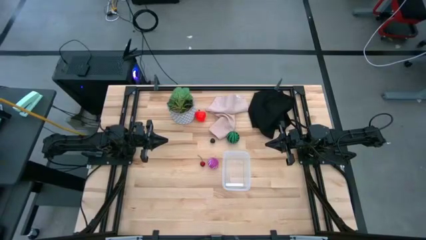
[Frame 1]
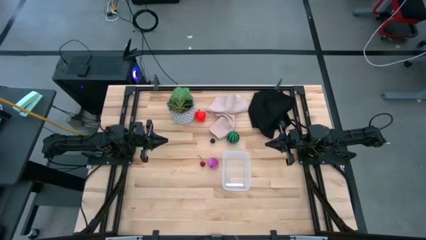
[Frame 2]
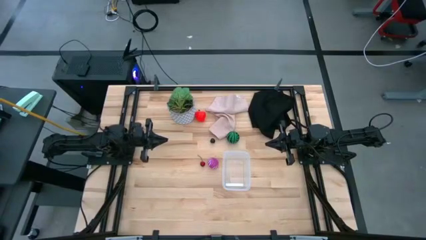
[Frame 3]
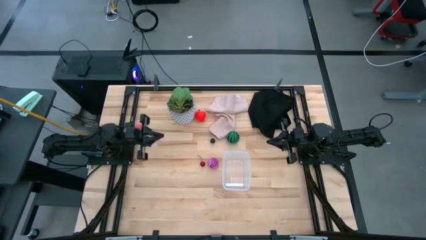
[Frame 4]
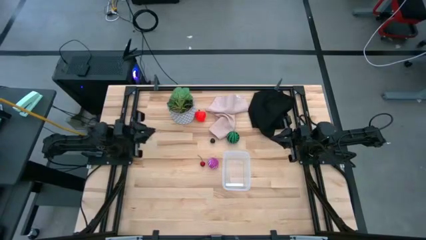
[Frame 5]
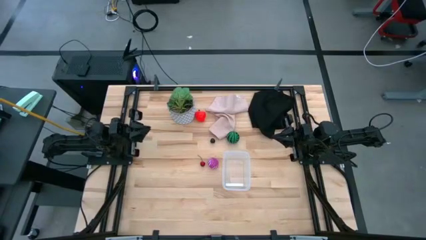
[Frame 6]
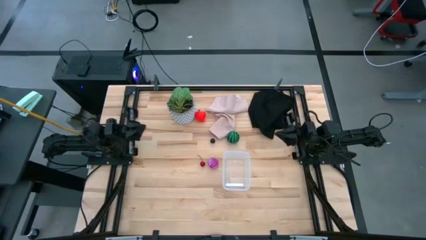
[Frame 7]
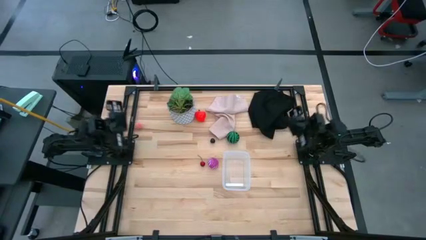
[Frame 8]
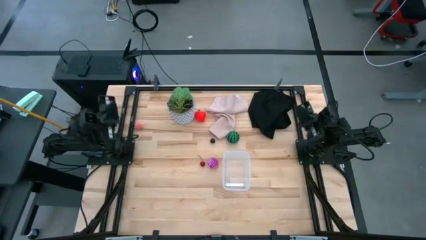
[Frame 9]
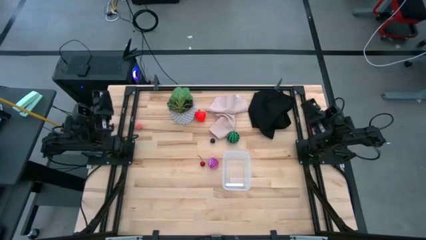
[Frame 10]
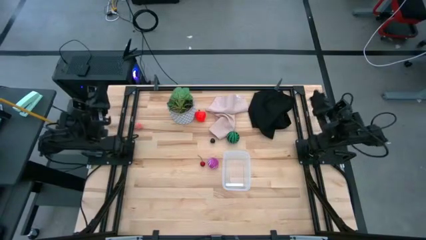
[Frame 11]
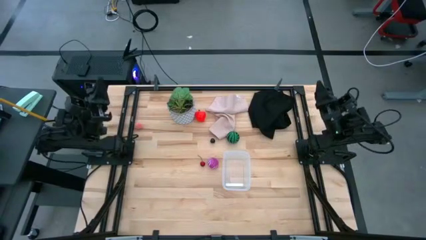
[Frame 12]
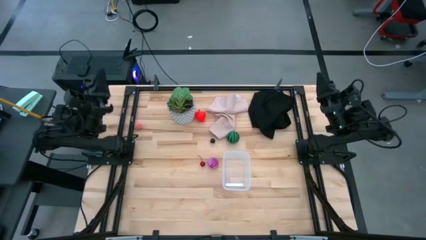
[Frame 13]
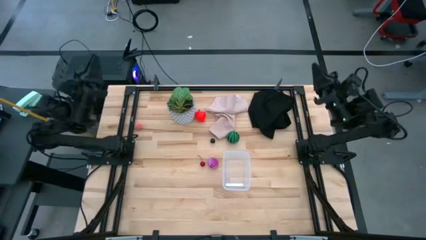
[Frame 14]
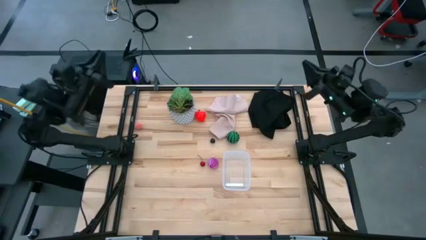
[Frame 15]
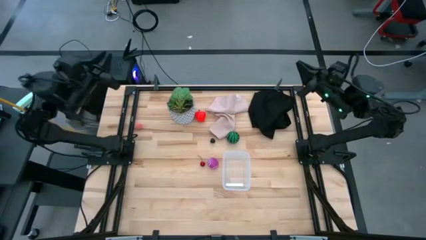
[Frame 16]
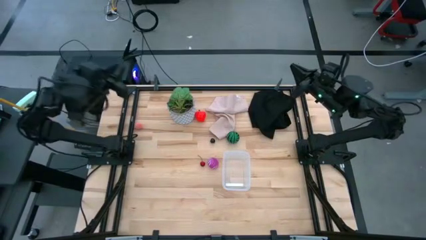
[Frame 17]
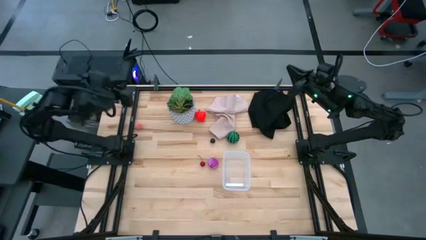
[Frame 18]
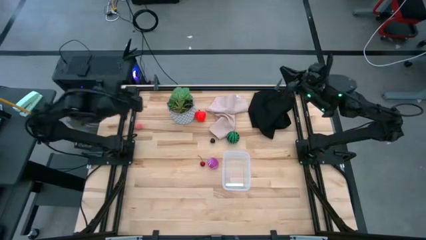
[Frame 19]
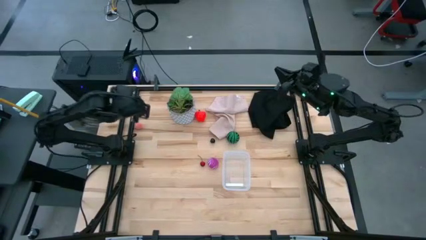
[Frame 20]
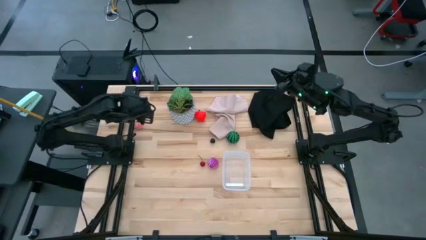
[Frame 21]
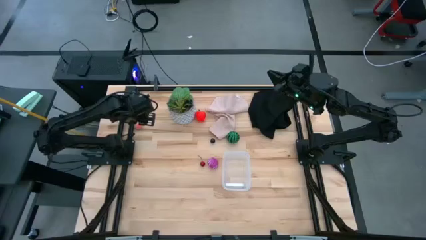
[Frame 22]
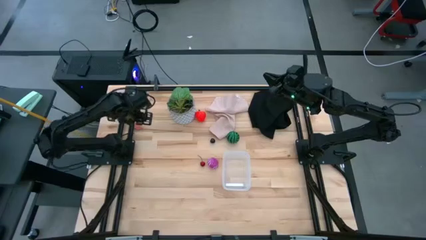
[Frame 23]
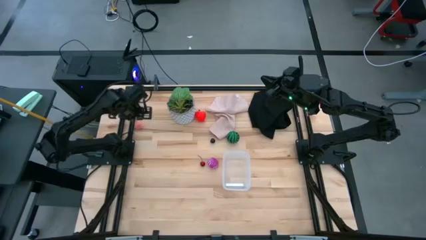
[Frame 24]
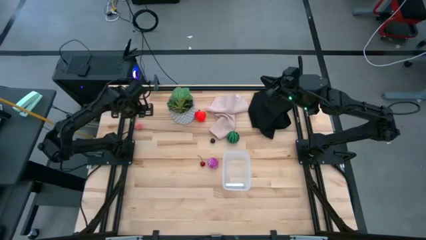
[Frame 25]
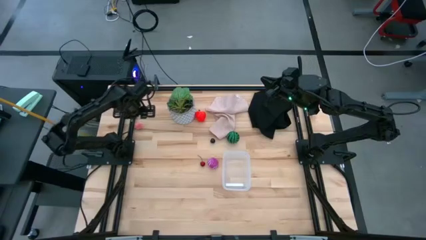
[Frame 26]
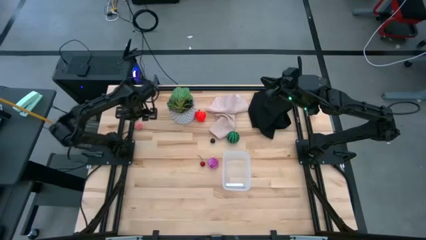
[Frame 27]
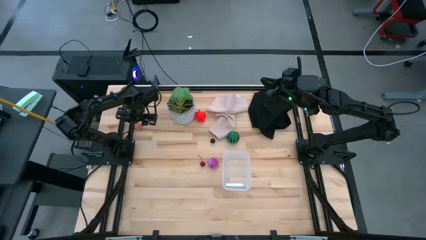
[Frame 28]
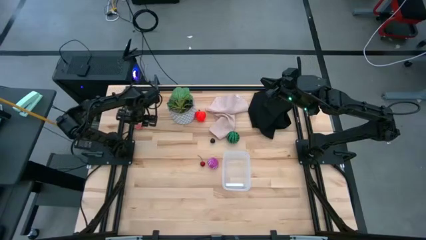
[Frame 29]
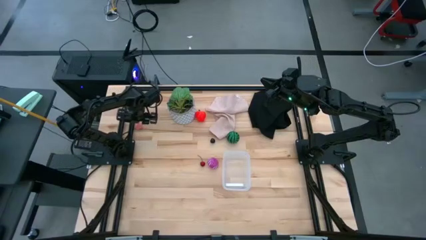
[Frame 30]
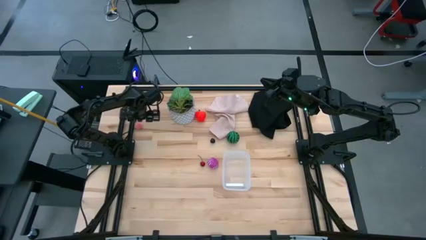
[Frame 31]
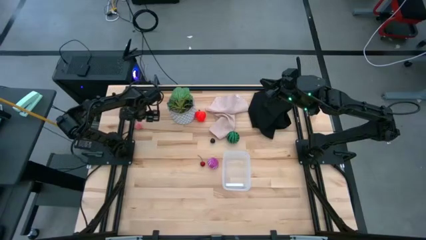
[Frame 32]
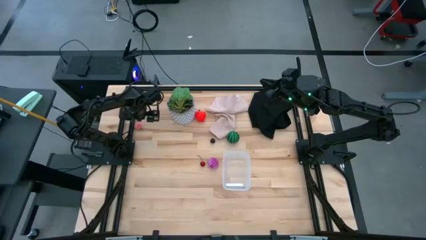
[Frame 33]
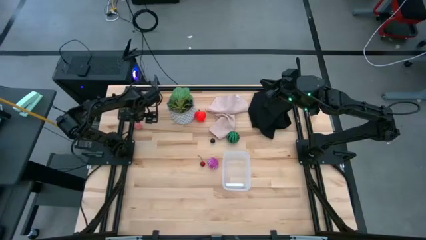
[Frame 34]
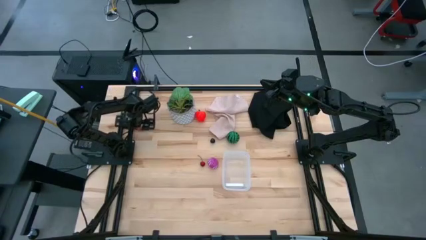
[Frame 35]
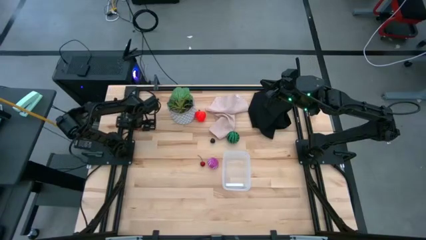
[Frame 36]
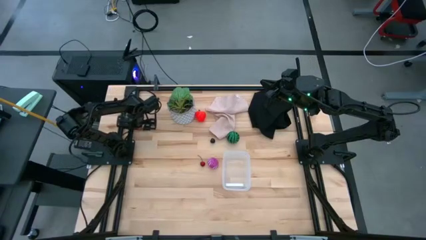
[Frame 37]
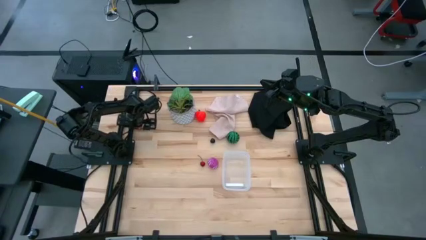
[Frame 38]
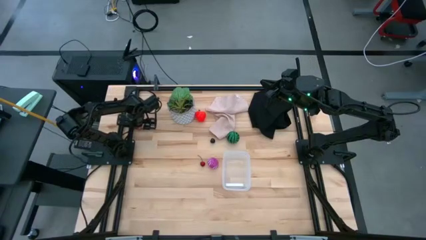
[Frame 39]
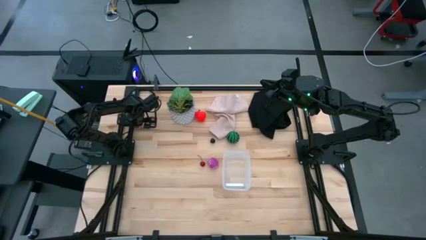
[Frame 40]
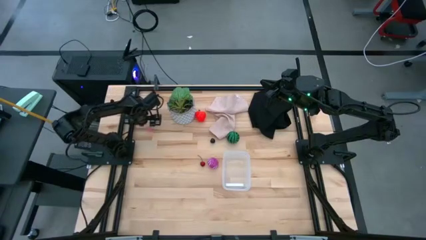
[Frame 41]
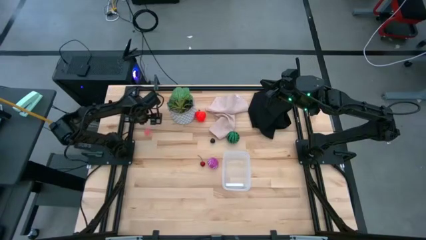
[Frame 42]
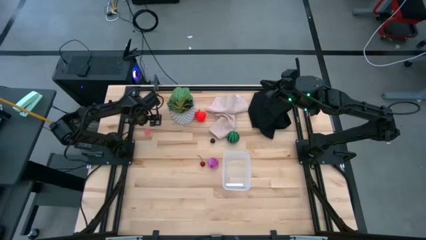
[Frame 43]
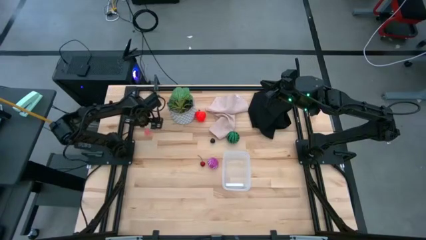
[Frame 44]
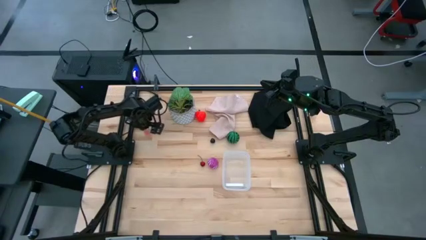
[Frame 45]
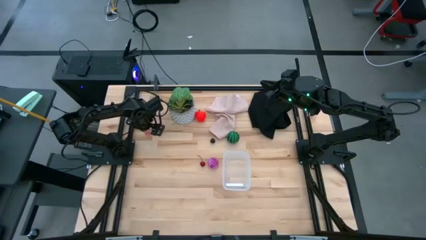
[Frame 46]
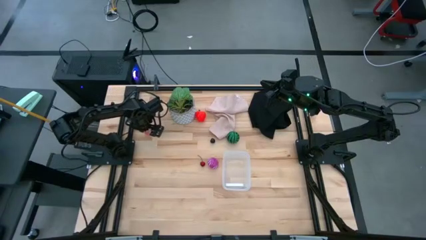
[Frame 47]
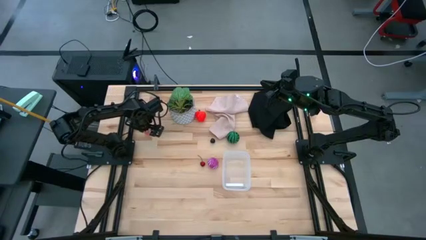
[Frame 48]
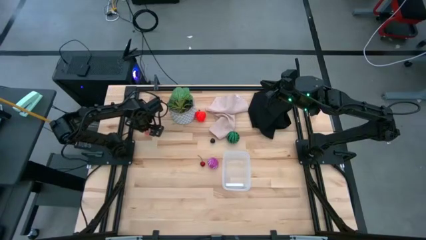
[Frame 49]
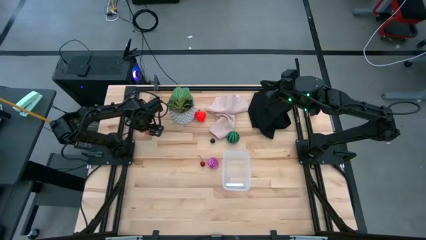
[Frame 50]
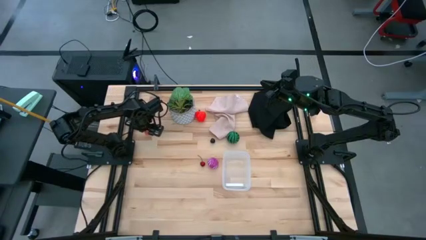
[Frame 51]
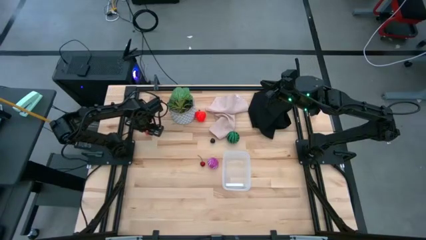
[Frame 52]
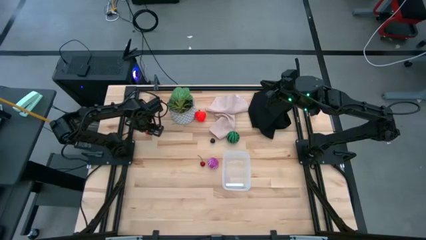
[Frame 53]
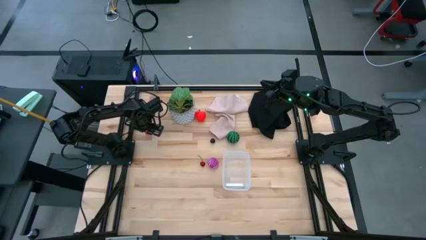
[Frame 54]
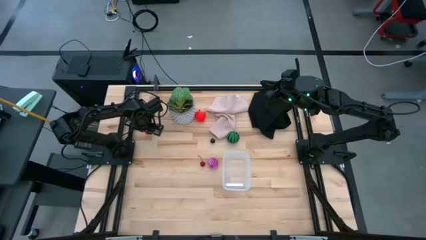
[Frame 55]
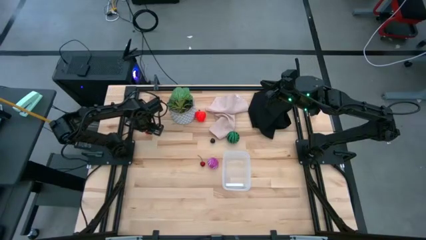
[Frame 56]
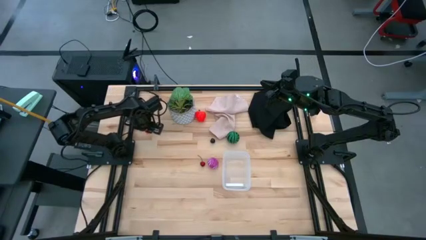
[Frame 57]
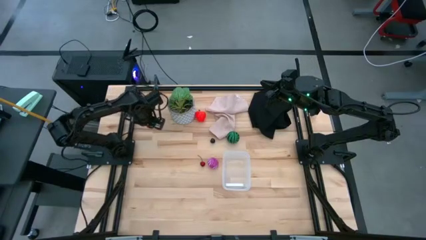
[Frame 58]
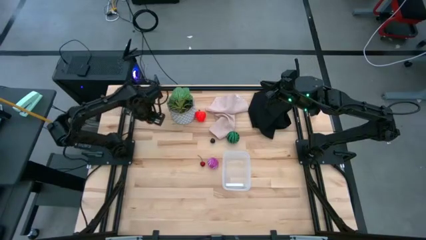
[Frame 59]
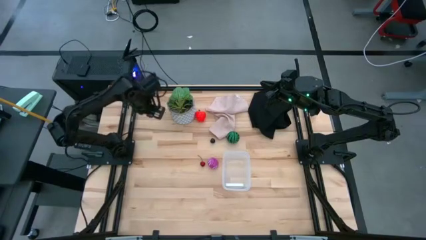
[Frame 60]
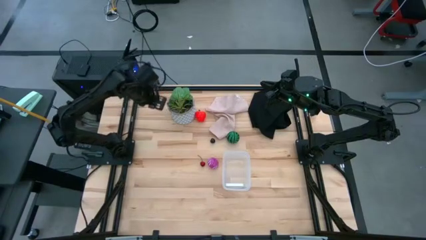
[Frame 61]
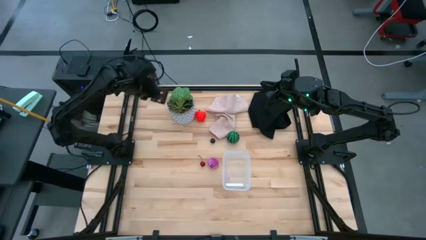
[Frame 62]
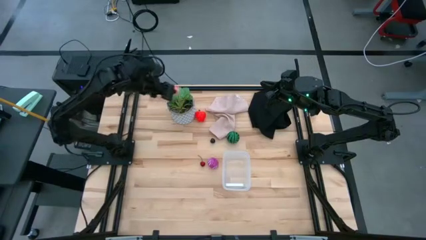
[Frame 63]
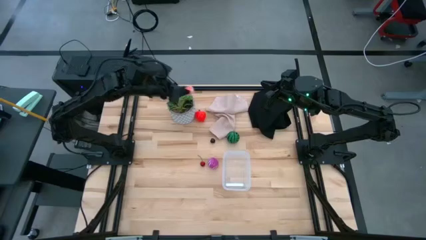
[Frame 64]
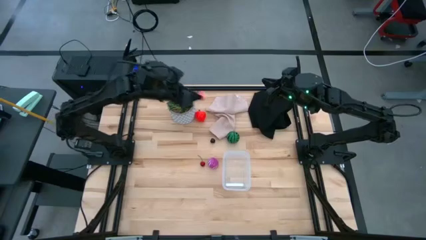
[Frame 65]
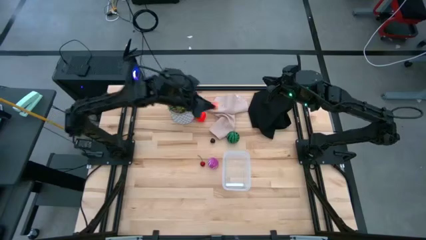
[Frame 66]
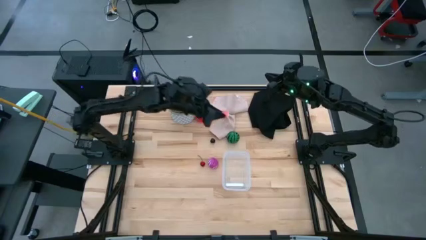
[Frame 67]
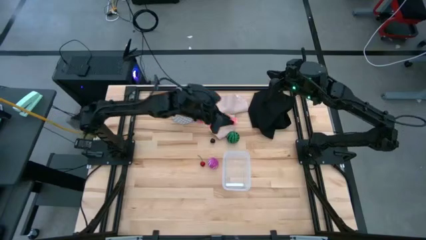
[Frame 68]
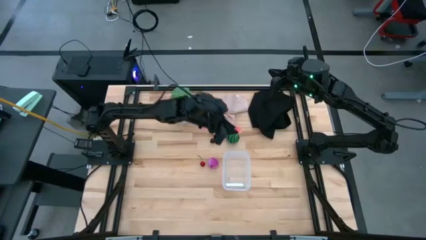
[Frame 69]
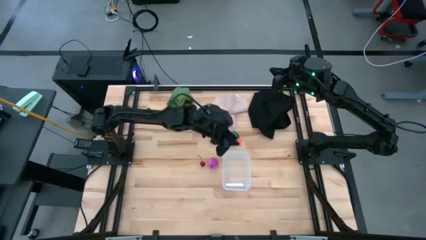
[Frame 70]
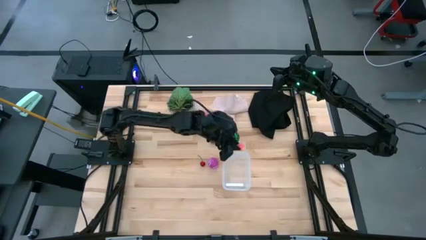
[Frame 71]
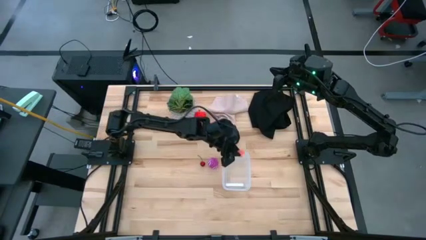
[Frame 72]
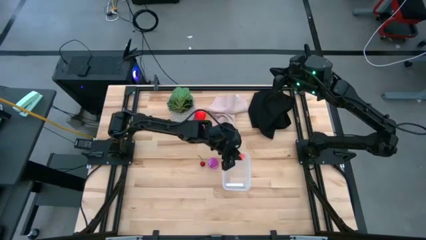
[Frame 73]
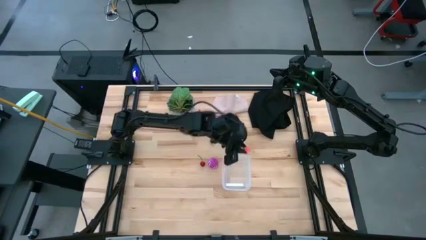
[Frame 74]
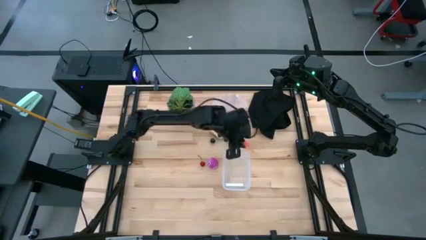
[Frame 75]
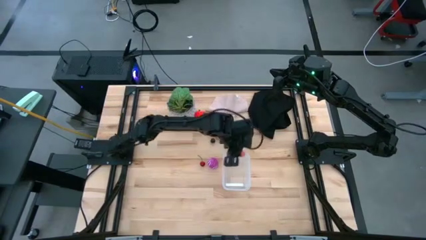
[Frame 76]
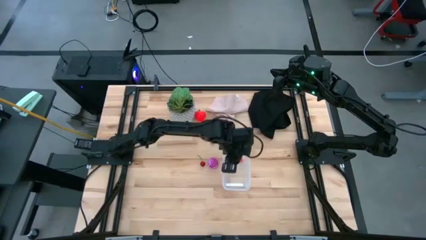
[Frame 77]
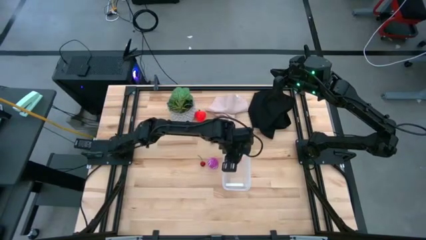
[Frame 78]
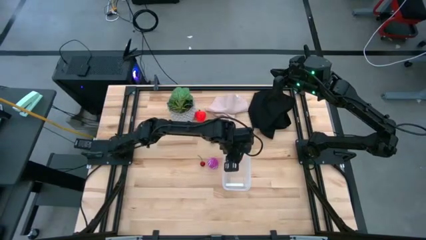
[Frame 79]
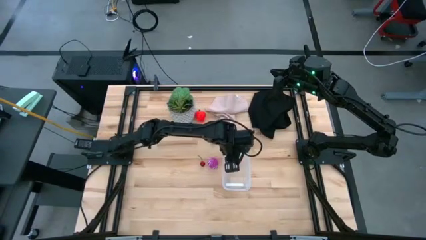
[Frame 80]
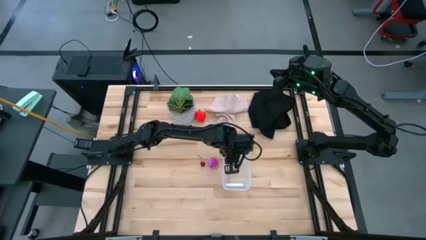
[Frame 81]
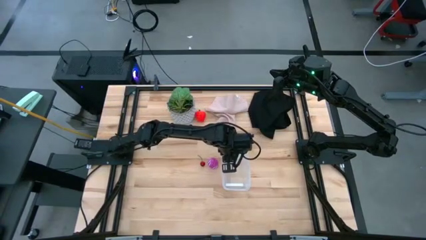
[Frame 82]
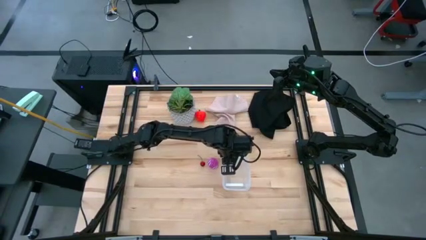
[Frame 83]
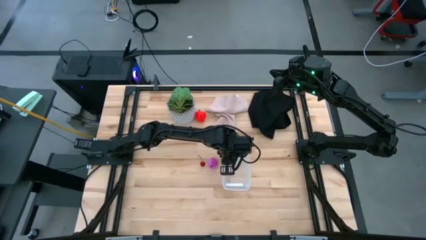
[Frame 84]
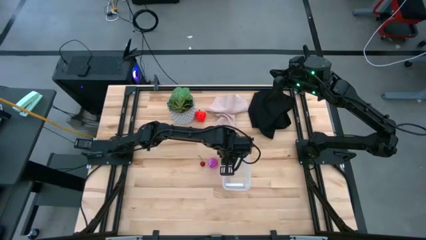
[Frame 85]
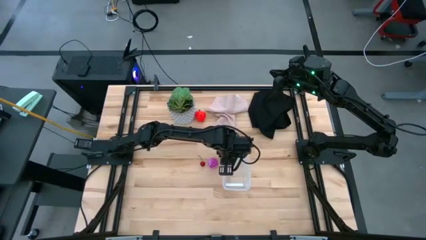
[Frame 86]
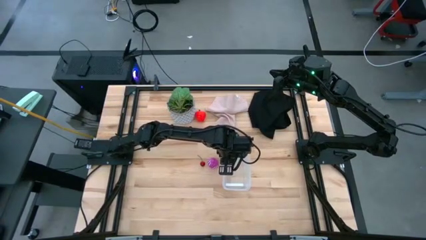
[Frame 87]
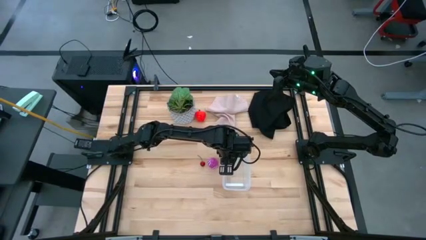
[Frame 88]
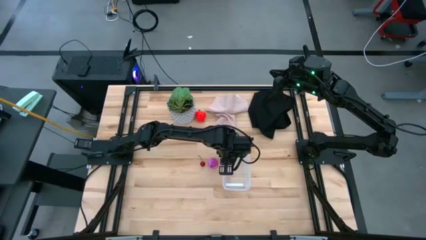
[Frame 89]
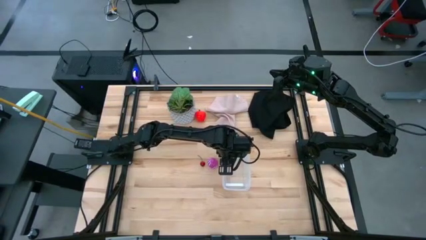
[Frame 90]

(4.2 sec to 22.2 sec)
Task: Pick and placing Produce into tupperware
Put the pink peach into the transparent bin
